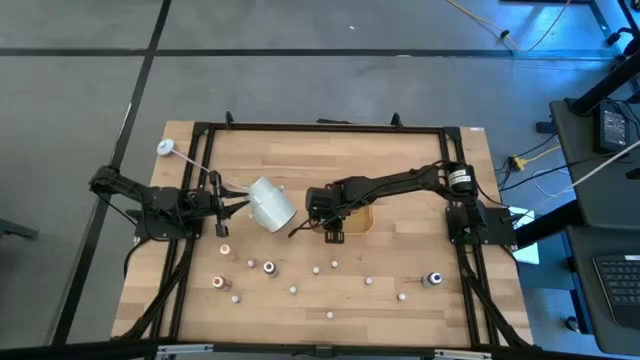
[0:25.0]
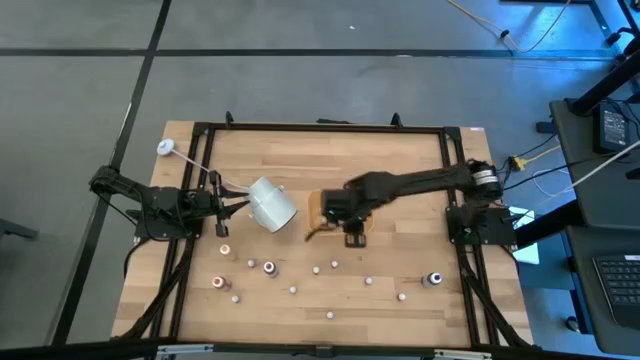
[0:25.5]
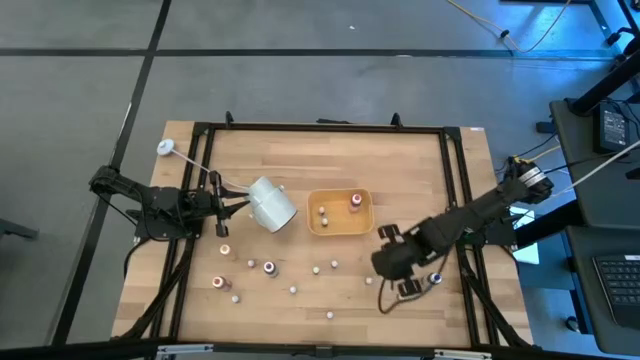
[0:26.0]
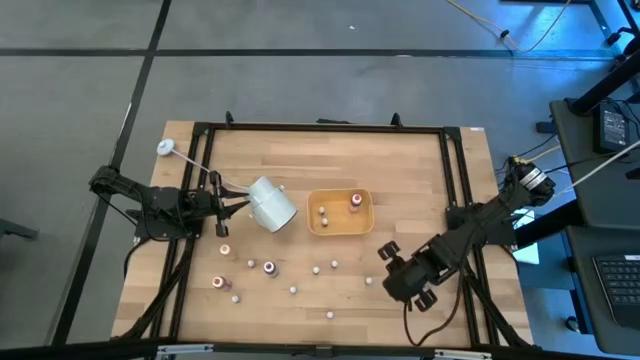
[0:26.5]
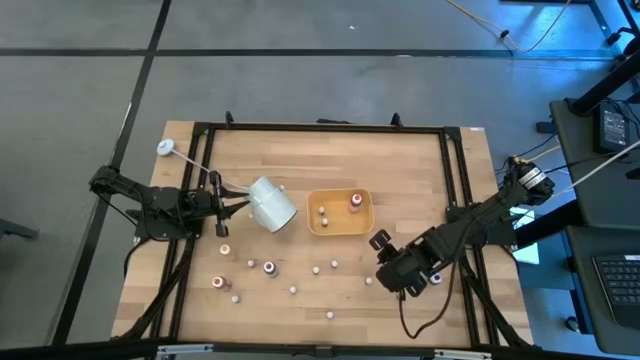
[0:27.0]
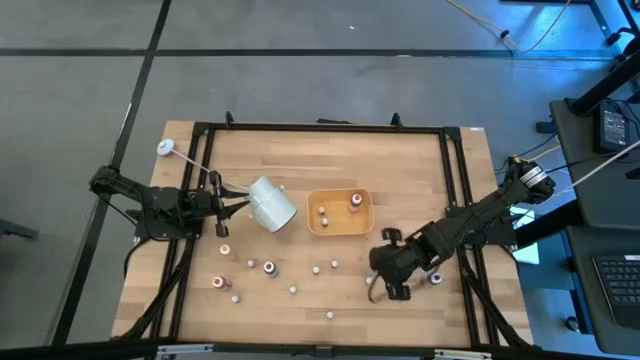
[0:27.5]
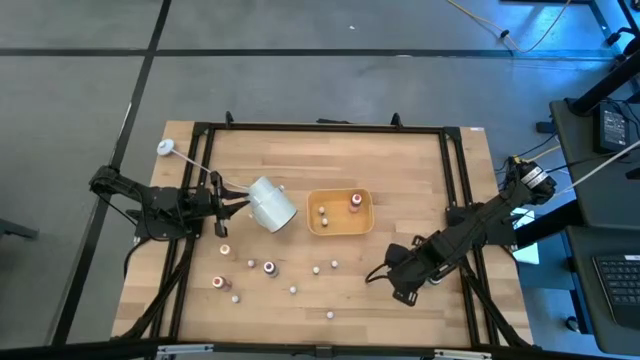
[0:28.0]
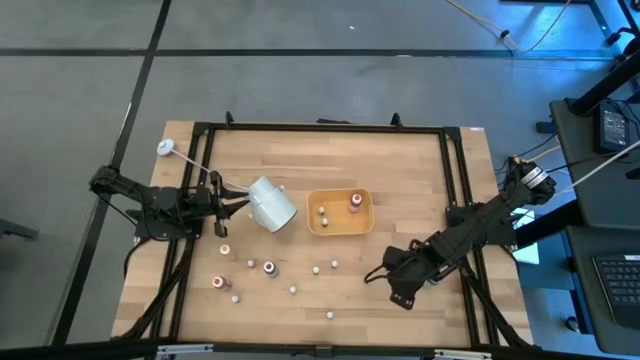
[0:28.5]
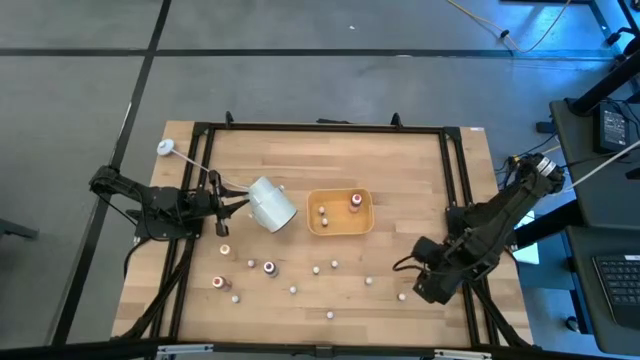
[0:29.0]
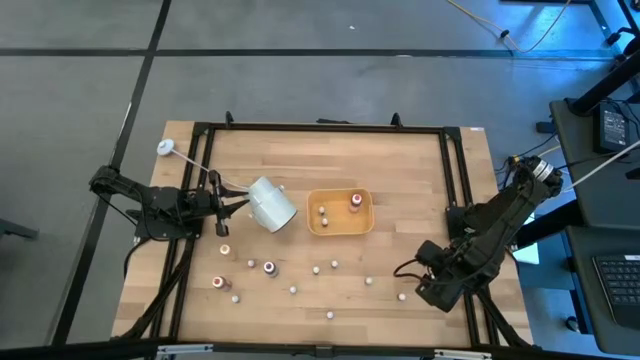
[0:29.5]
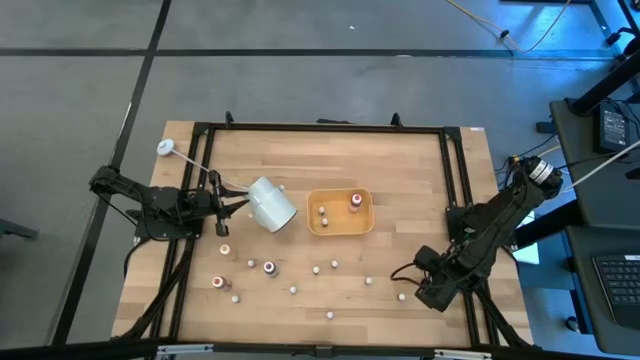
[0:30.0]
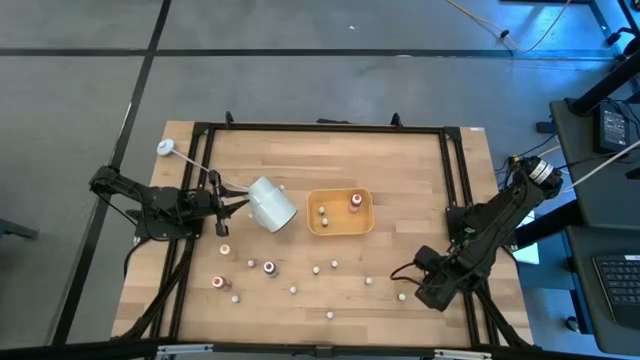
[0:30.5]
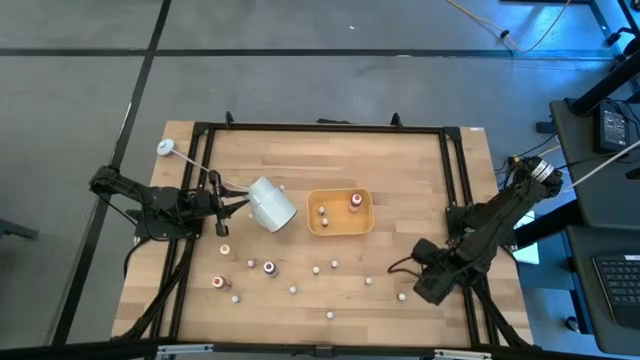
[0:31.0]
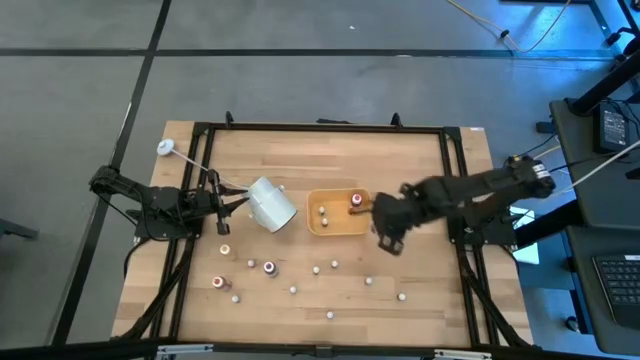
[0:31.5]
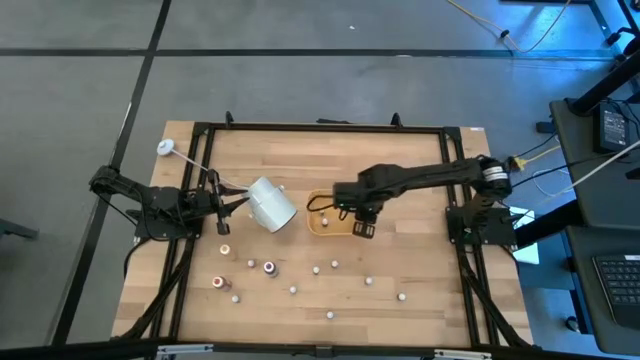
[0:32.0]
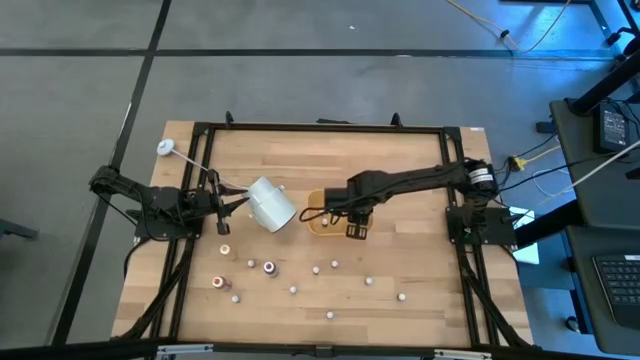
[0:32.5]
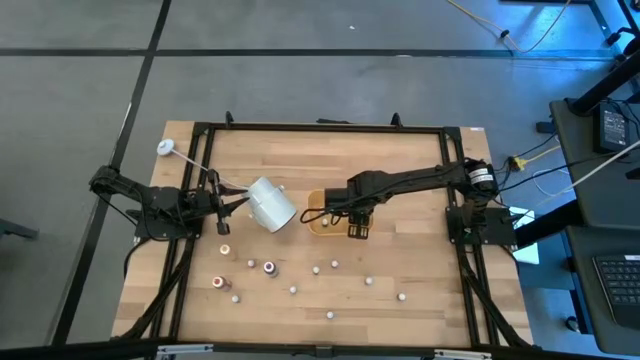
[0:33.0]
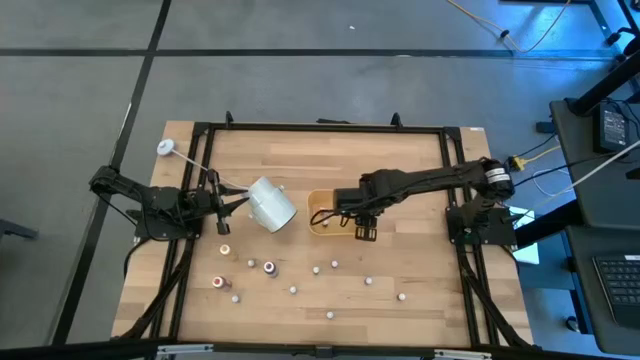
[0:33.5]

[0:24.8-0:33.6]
Task: Pick & Place food coloring
Put the large blue food coloring bottle into the yellow bin

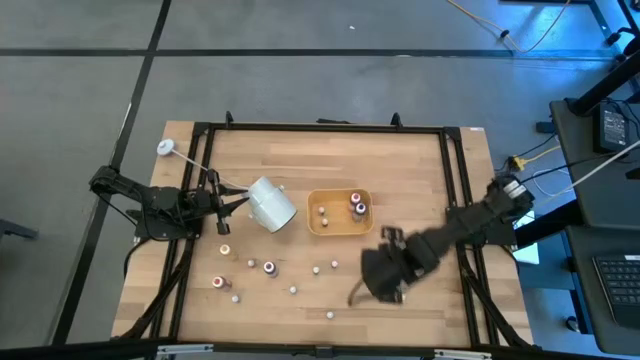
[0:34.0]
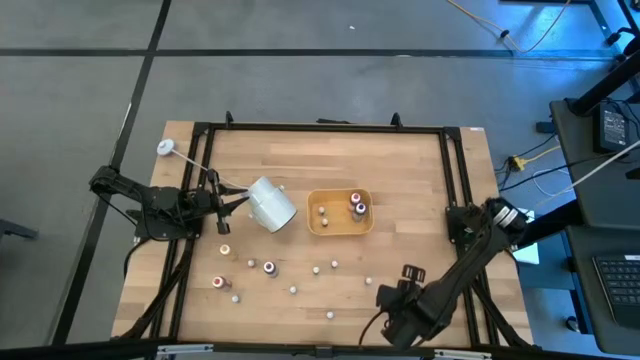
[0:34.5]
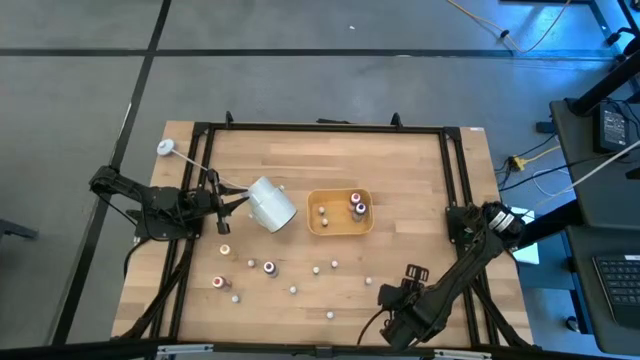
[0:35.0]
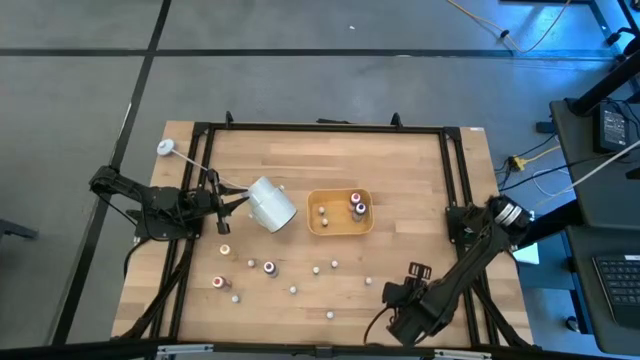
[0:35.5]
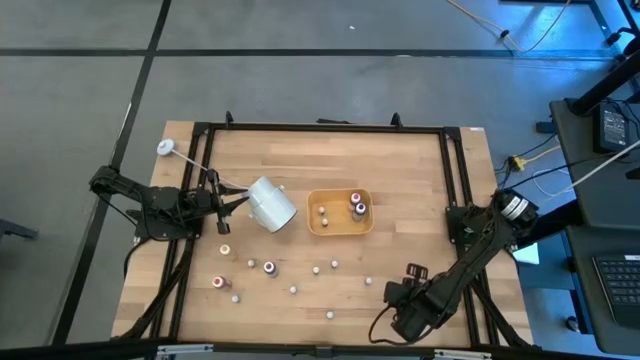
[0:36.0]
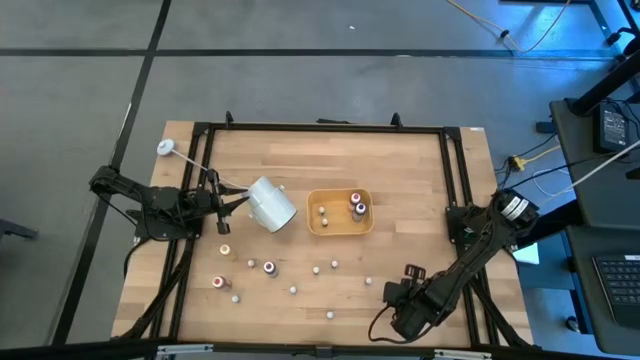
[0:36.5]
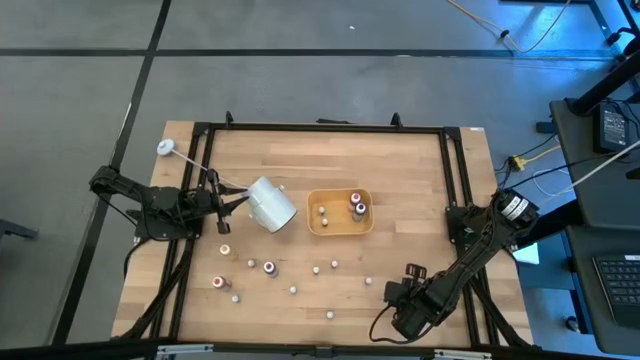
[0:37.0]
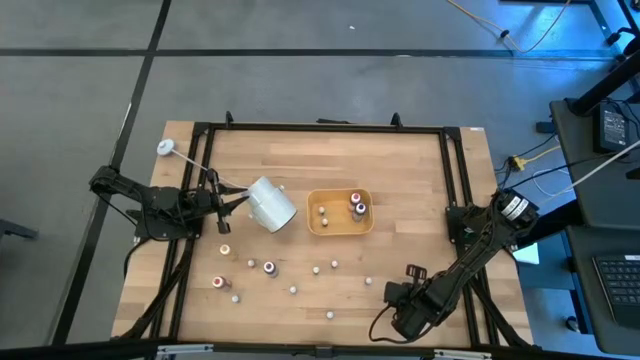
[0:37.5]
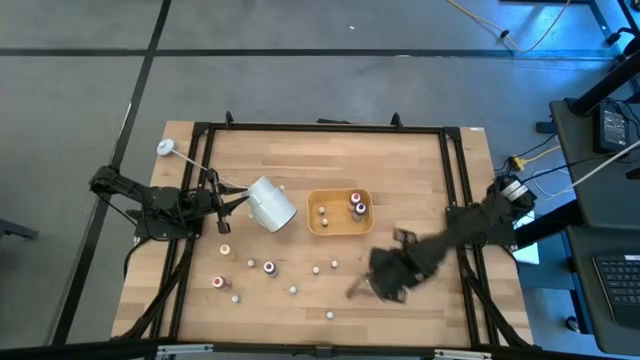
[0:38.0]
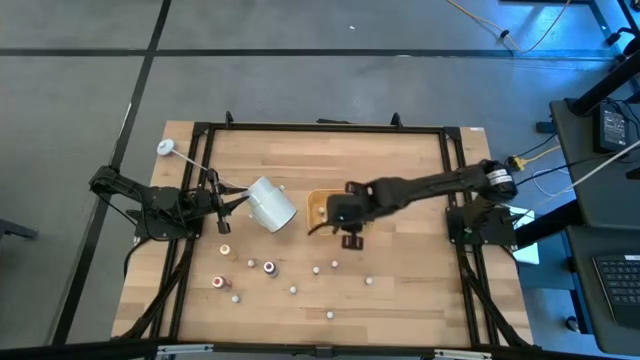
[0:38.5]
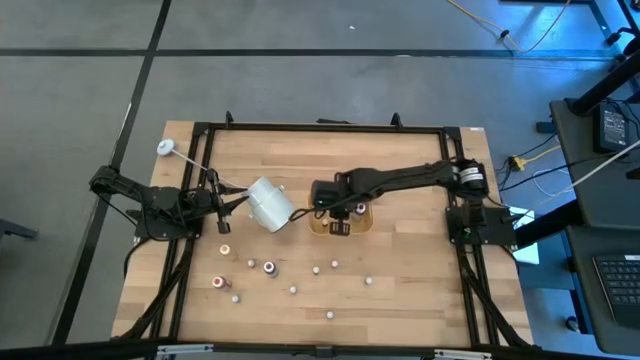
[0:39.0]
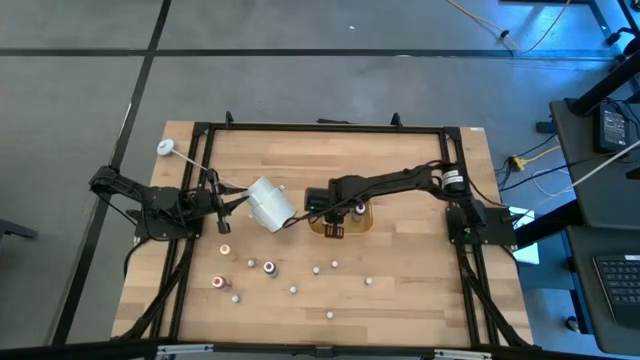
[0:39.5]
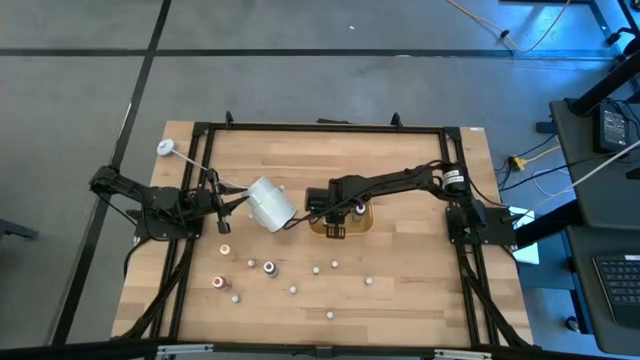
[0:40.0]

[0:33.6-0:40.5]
Put the small black food coloring bottle into the yellow bin

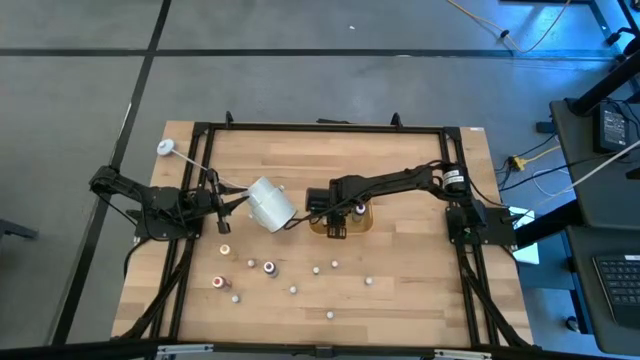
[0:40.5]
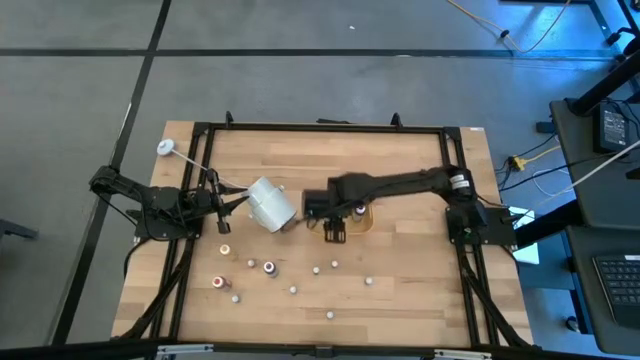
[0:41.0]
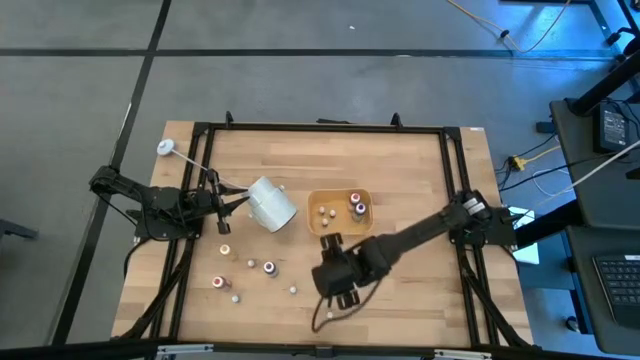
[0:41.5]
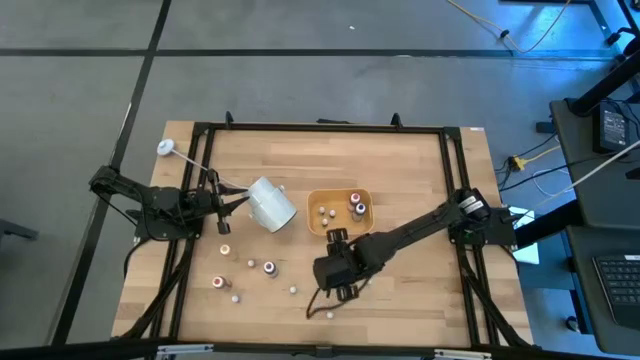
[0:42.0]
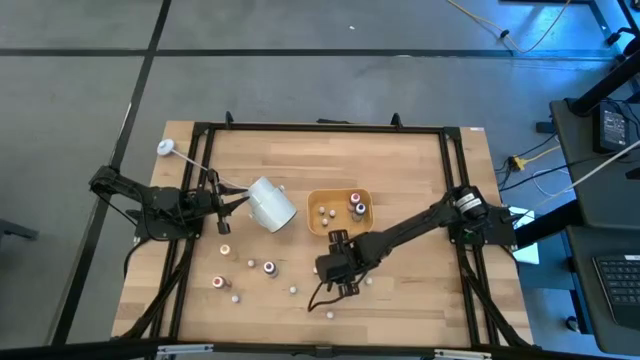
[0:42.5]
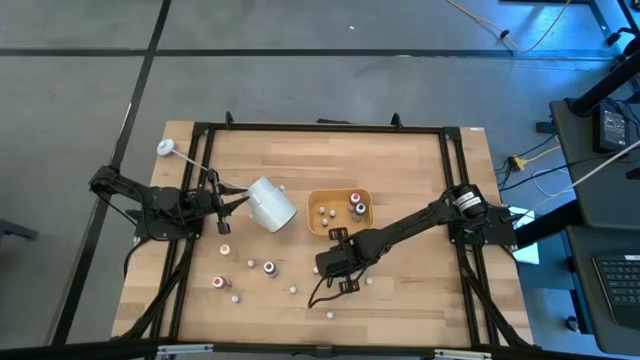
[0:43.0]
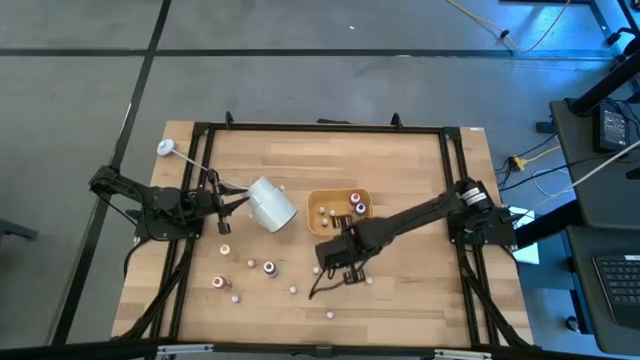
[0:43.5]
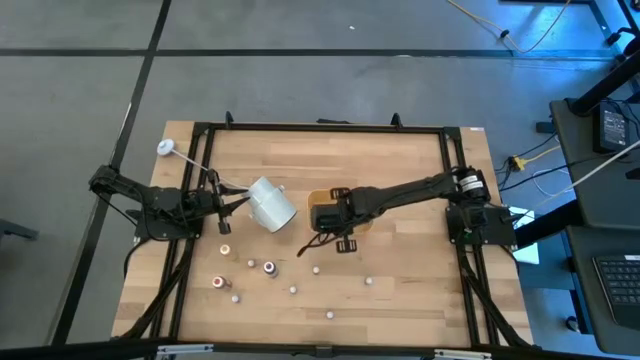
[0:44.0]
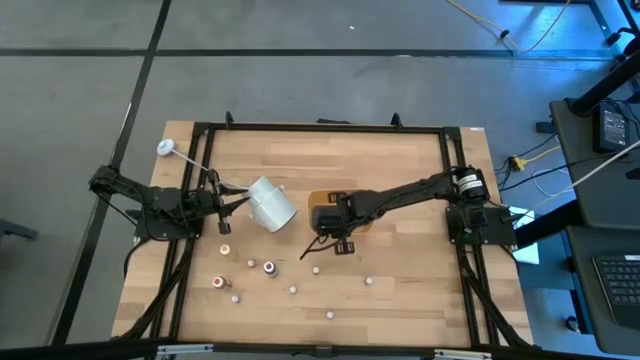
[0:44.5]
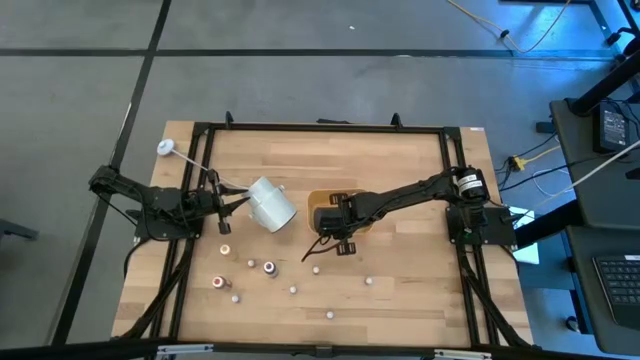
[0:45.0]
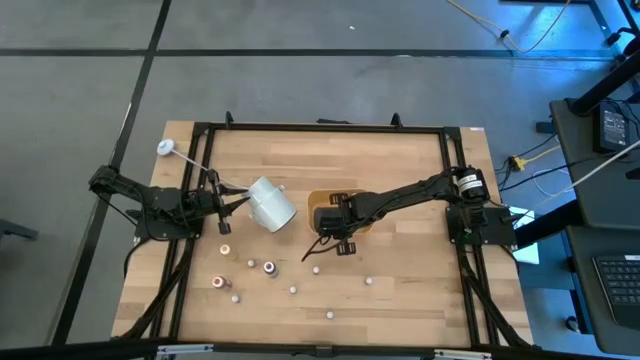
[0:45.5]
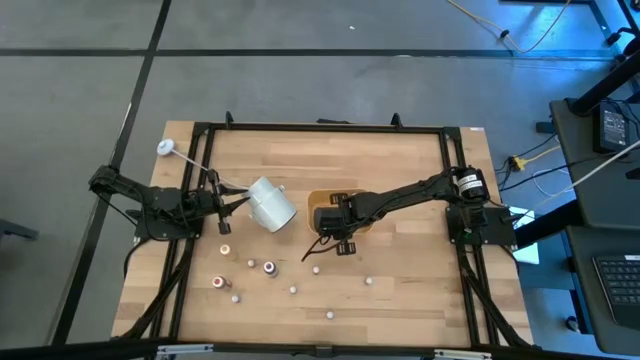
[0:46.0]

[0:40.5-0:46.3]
Put the top small red food coloring bottle into the yellow bin
